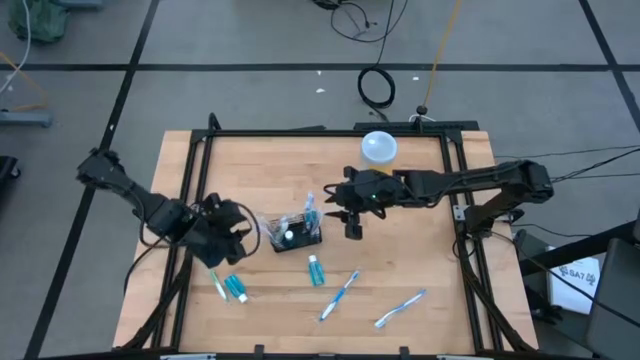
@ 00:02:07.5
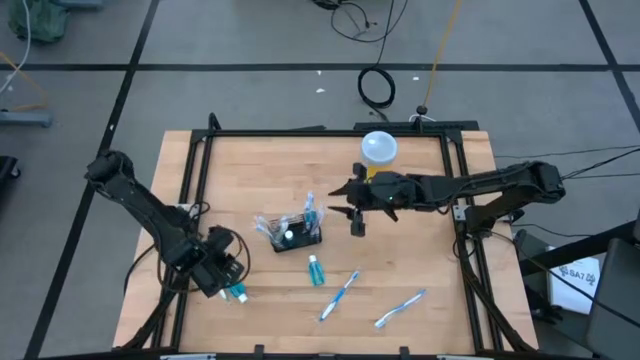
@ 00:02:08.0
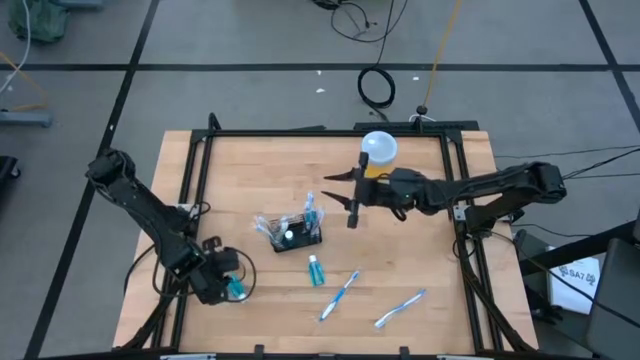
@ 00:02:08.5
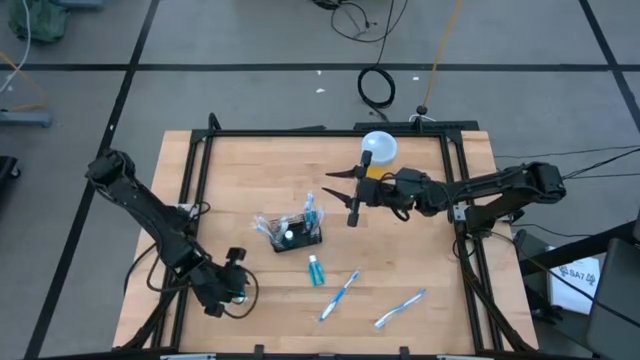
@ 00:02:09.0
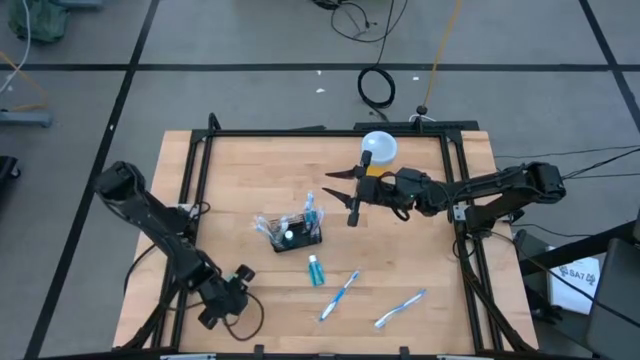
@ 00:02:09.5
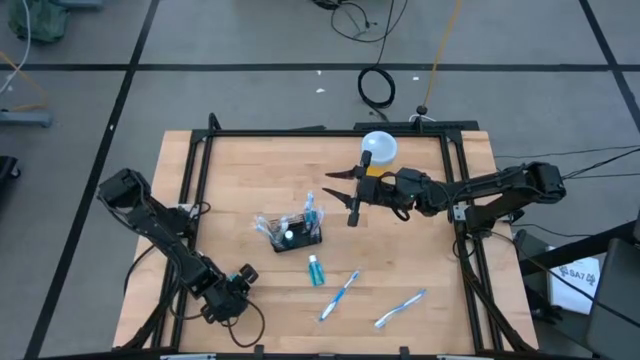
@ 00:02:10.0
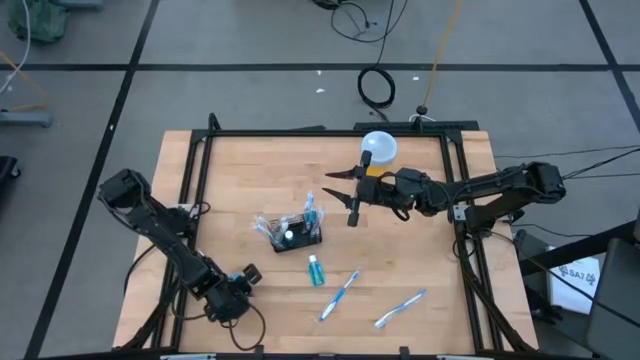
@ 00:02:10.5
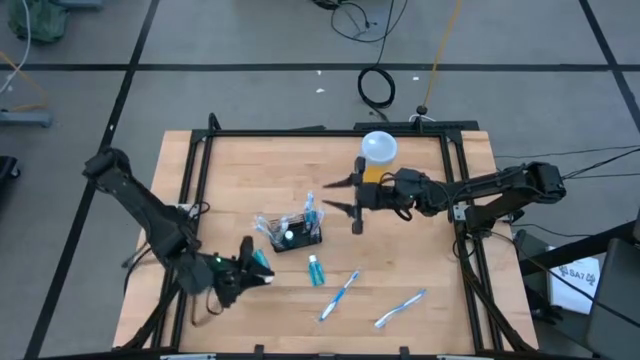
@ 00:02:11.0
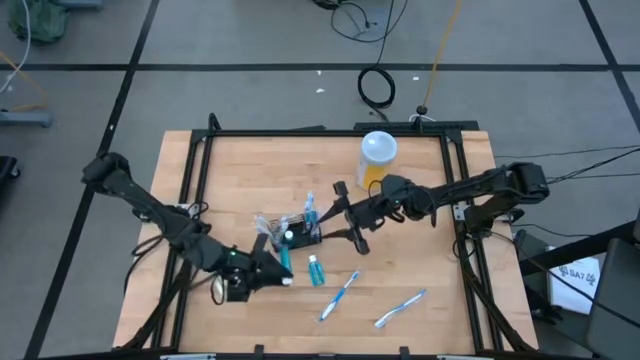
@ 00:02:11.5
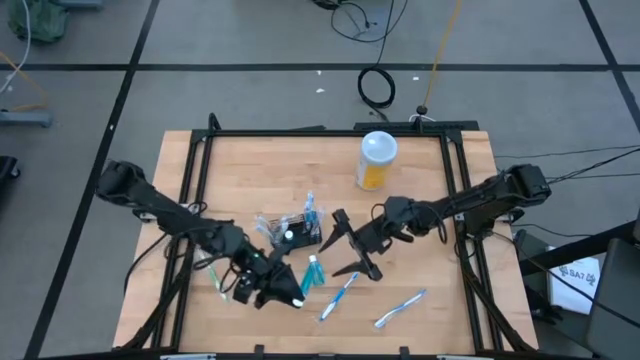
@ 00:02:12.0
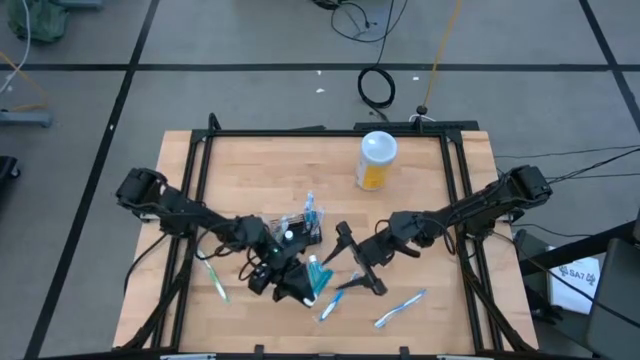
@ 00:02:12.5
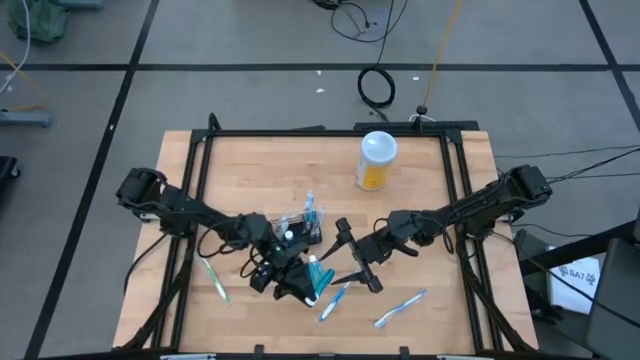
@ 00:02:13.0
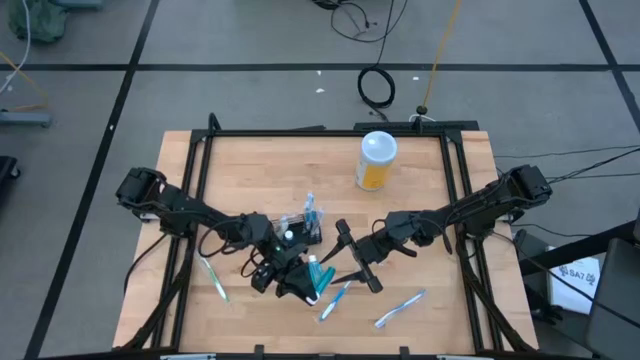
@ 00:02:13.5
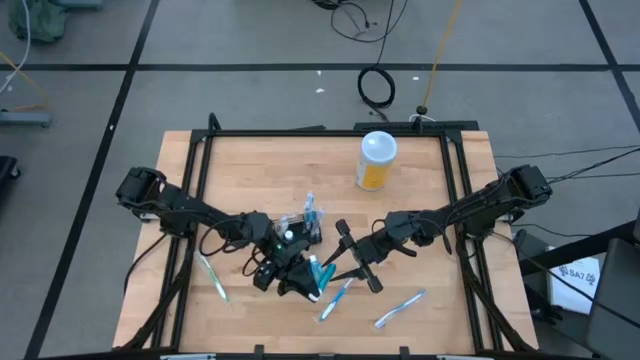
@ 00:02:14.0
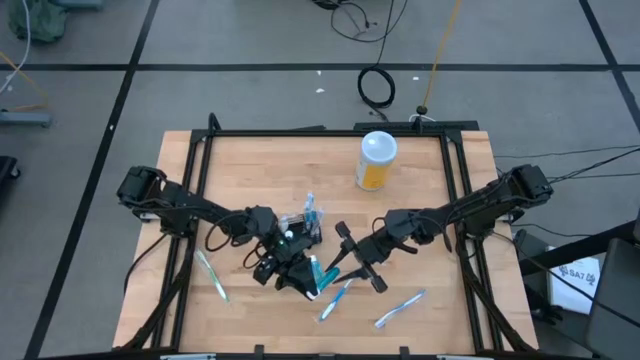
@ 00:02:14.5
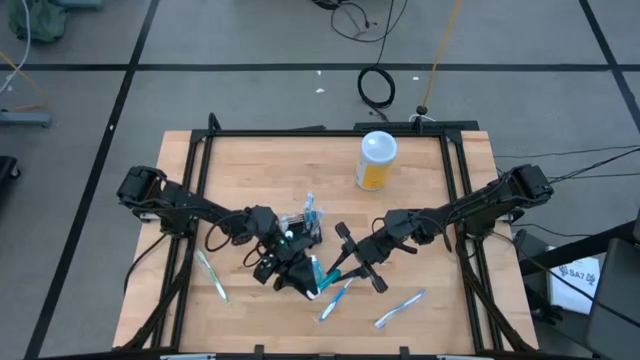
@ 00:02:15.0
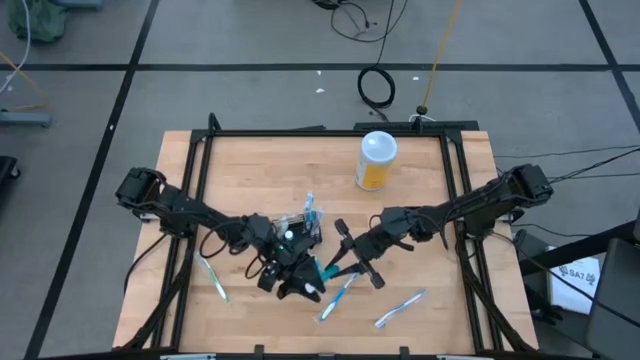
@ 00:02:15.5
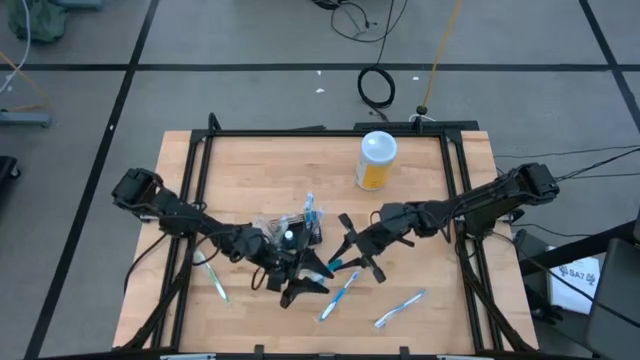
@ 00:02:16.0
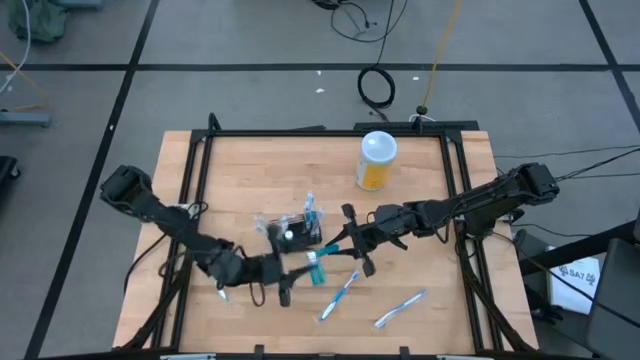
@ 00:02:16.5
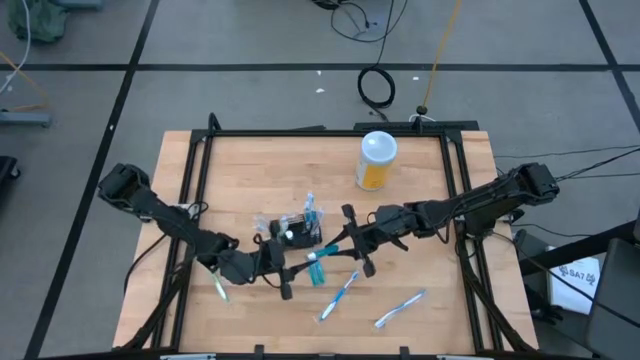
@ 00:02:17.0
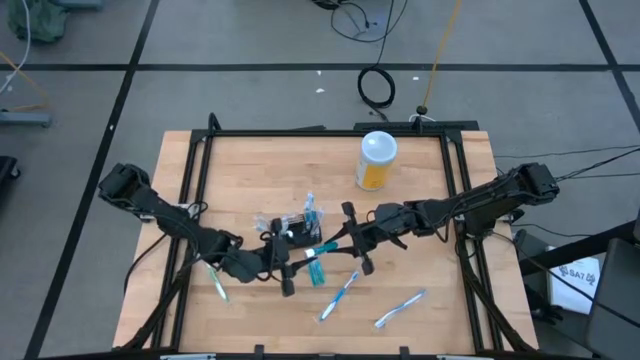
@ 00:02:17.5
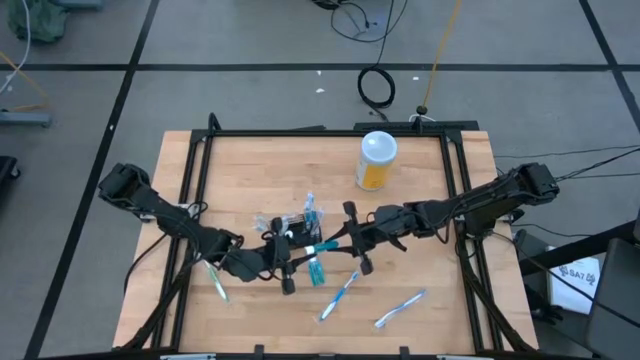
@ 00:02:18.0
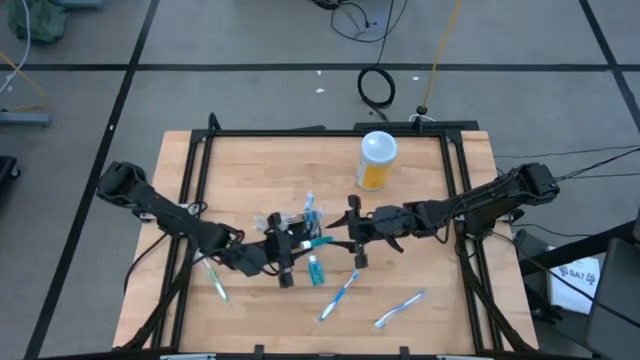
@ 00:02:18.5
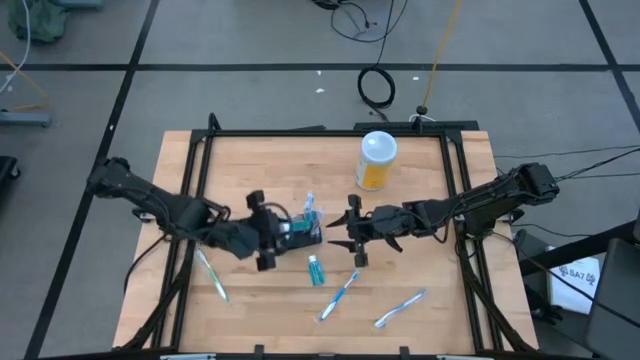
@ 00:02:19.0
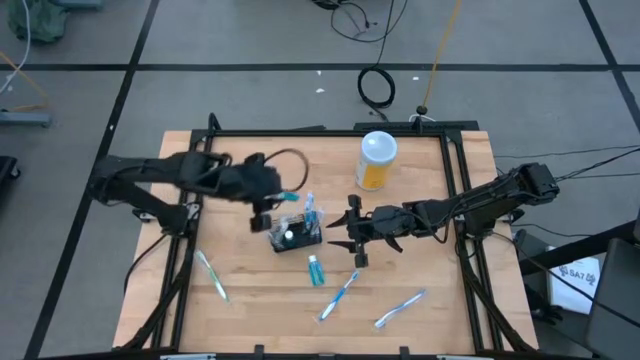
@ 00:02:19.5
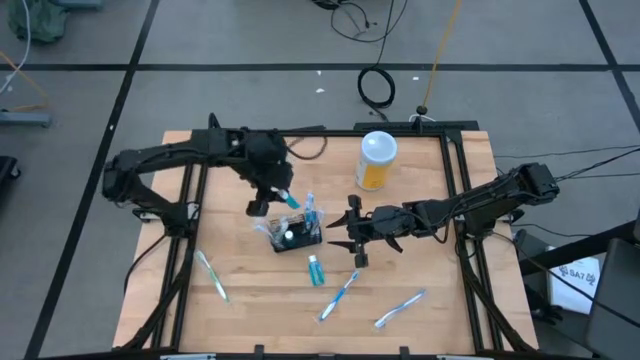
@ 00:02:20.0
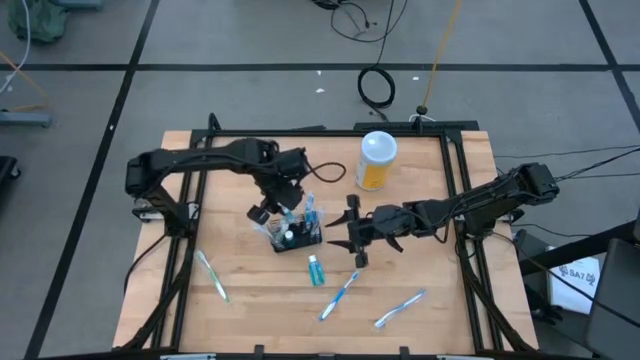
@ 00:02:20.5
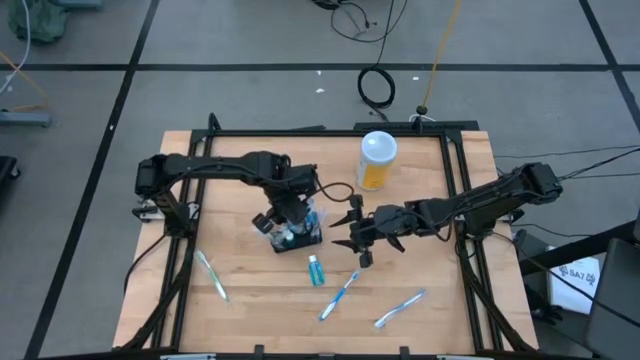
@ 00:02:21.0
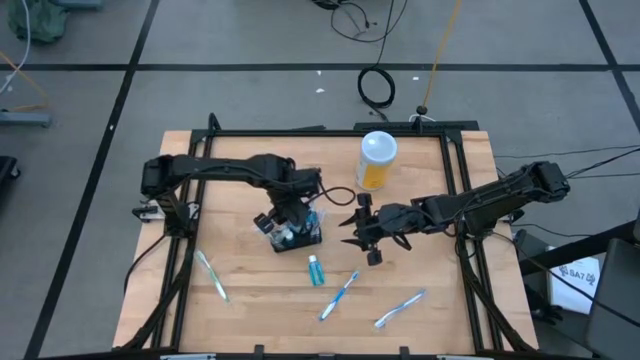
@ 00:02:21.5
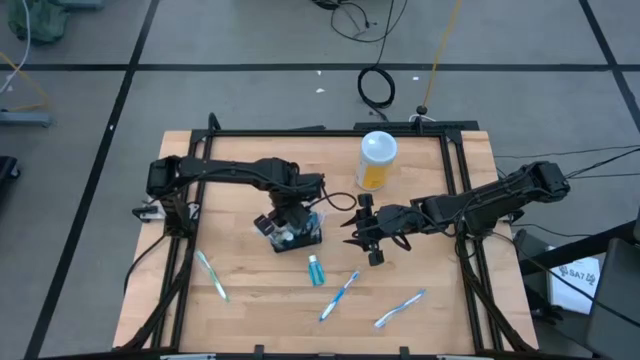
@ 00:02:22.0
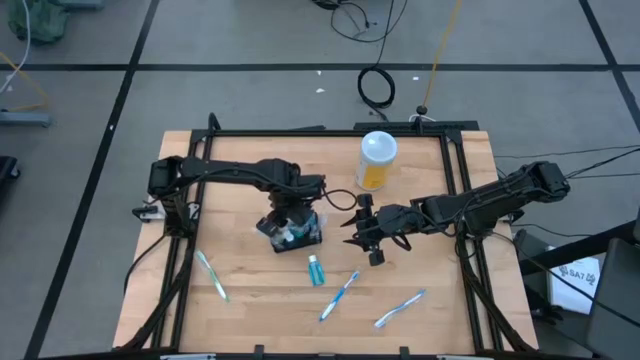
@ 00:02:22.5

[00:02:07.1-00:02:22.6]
Task: Pick & Place toothbrushing station
Put the bottom left mouthwash bottle into the black wire organizer

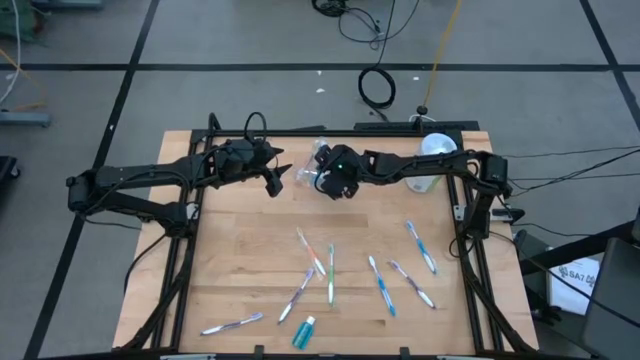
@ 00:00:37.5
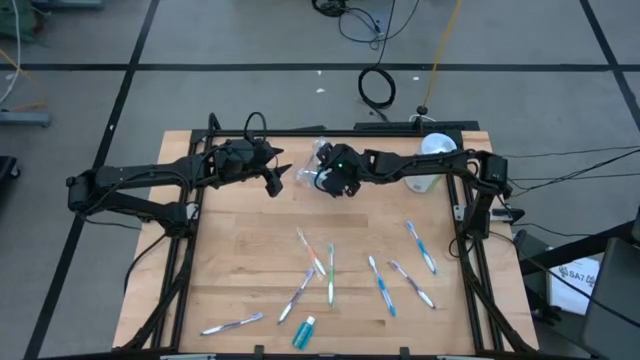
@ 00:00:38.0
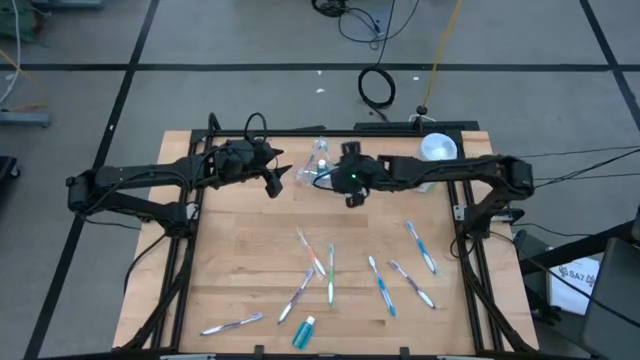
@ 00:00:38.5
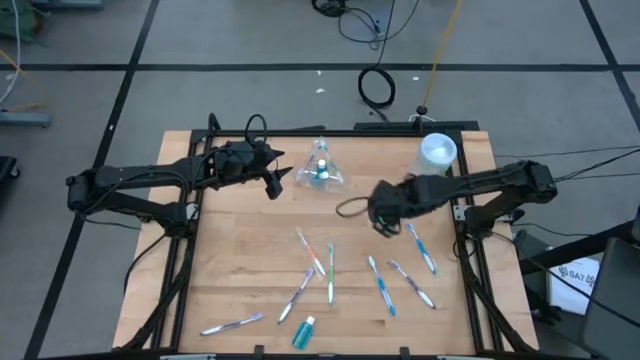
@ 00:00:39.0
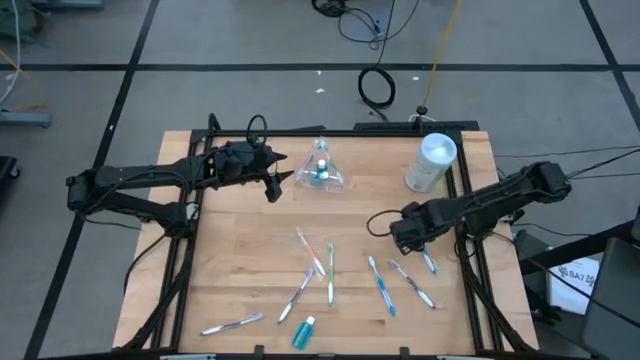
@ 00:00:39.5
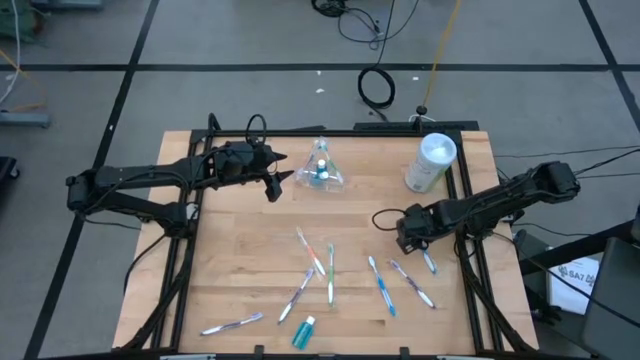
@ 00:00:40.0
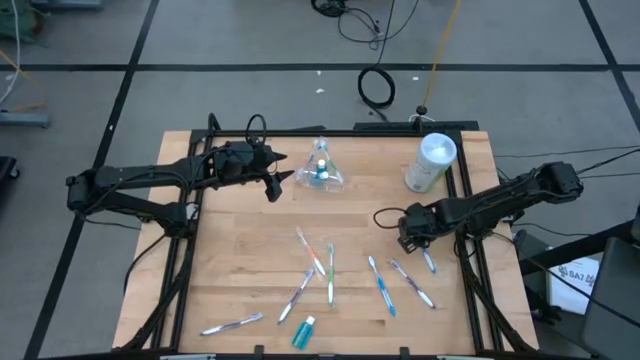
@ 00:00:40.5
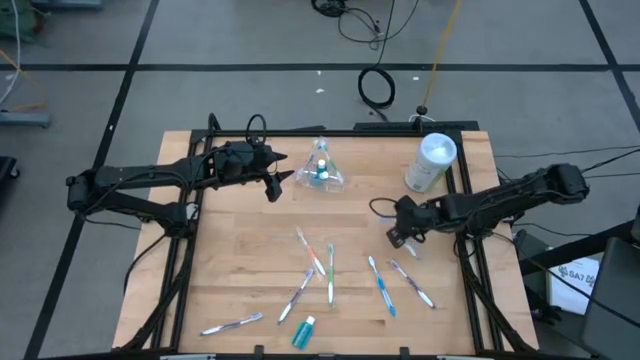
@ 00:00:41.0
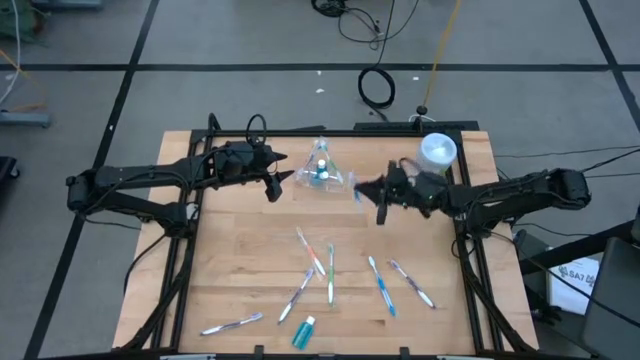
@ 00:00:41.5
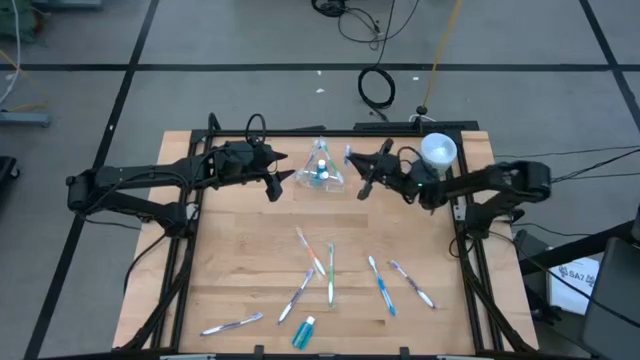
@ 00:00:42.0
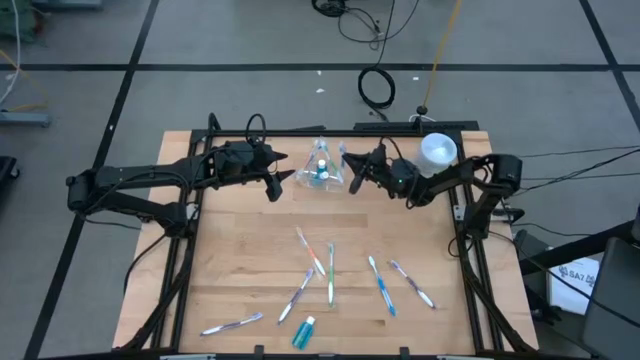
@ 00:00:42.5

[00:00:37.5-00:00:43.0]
Task: Pick & Place toothbrushing station
Put the top blue toothbrush into the transparent organizer

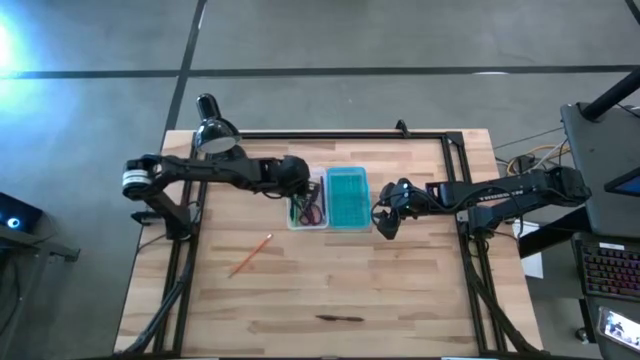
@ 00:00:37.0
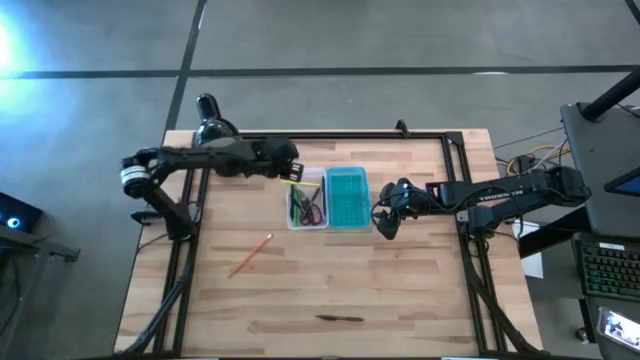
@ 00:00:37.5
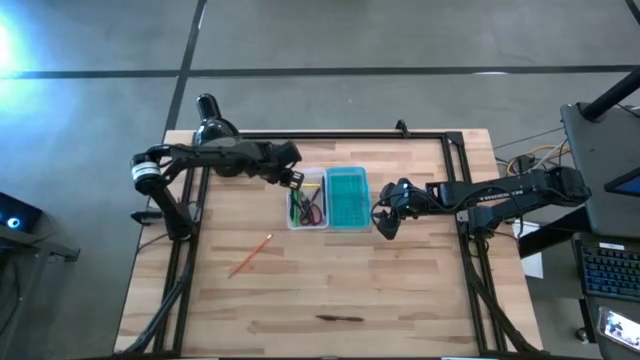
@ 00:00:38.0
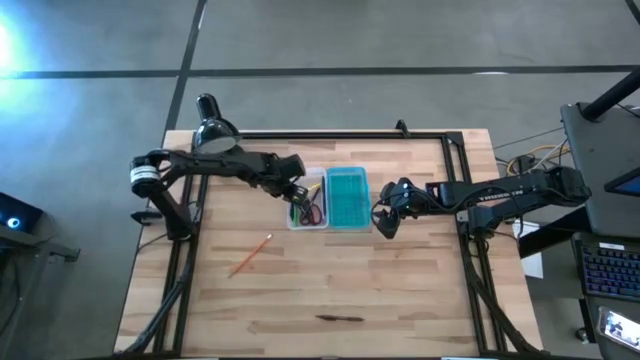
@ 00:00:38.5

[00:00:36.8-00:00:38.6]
Task: Pick & place school supplies into a supply box
Adjust the yellow pen in the supply box
